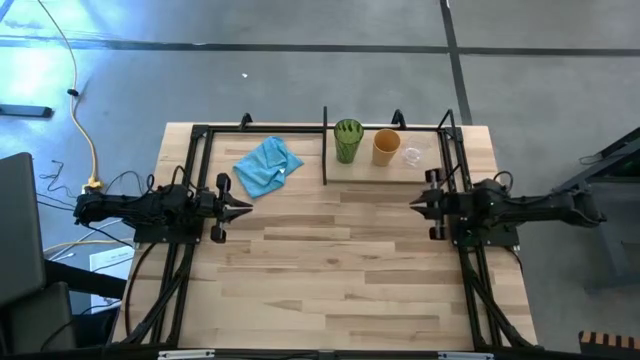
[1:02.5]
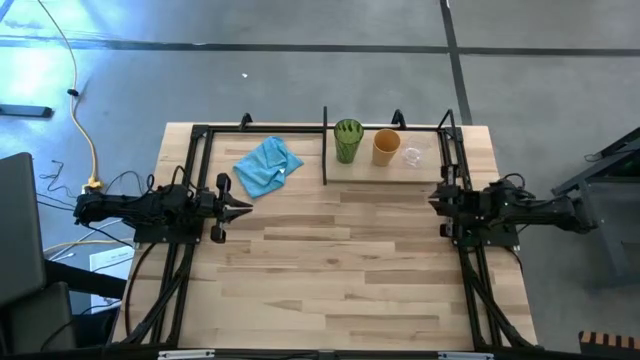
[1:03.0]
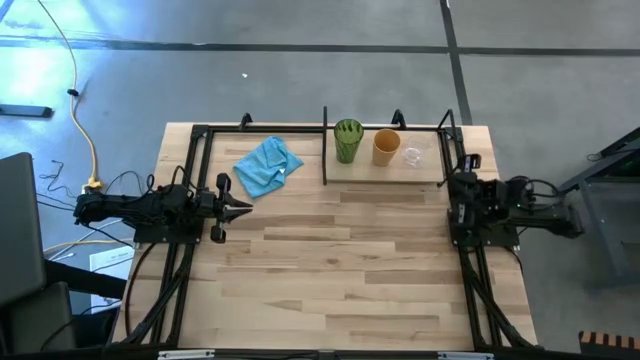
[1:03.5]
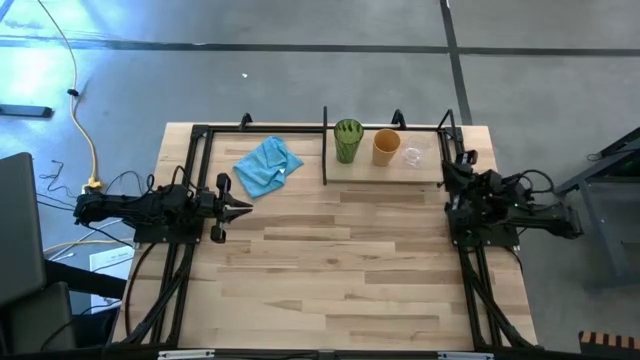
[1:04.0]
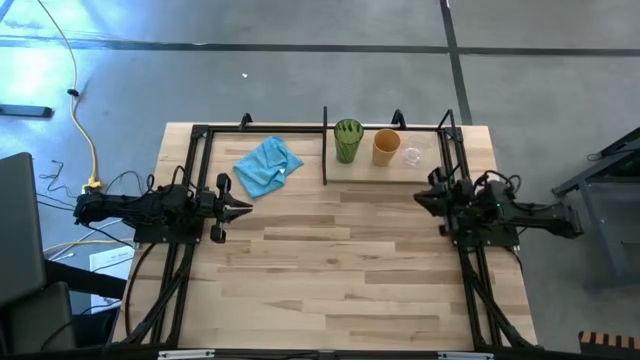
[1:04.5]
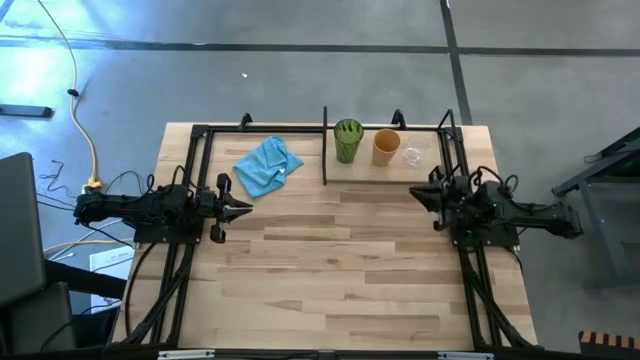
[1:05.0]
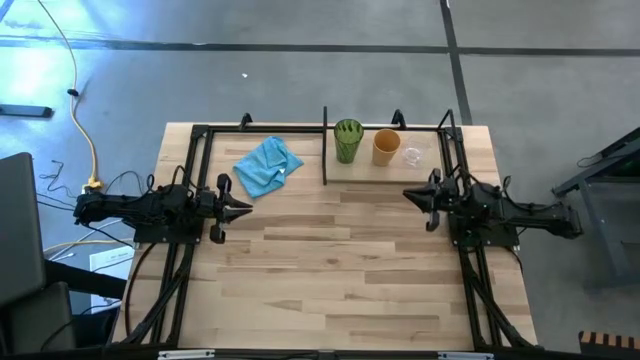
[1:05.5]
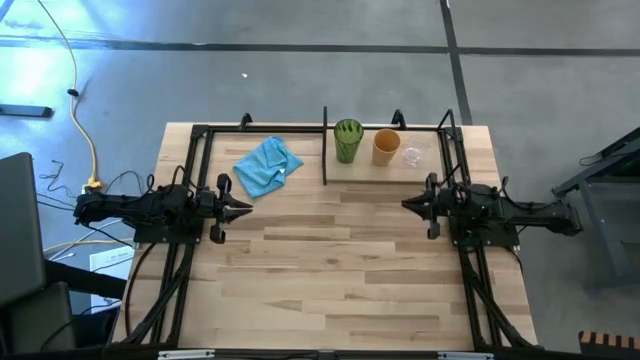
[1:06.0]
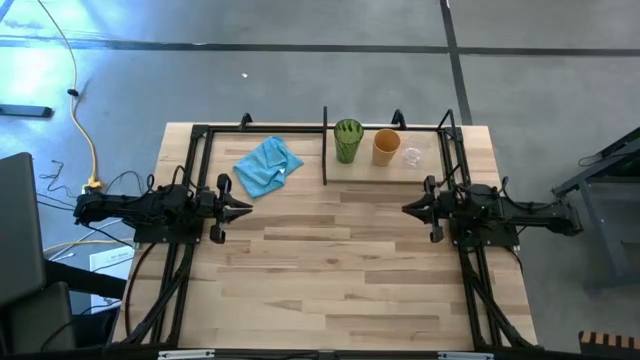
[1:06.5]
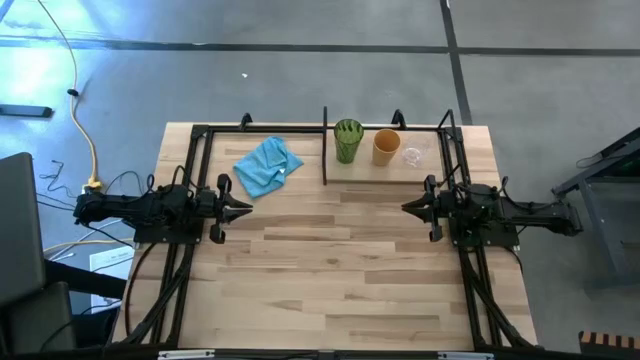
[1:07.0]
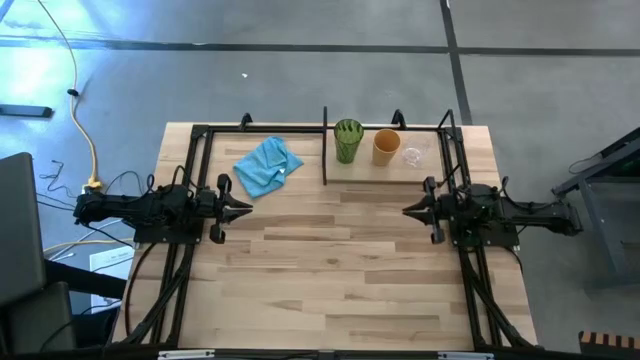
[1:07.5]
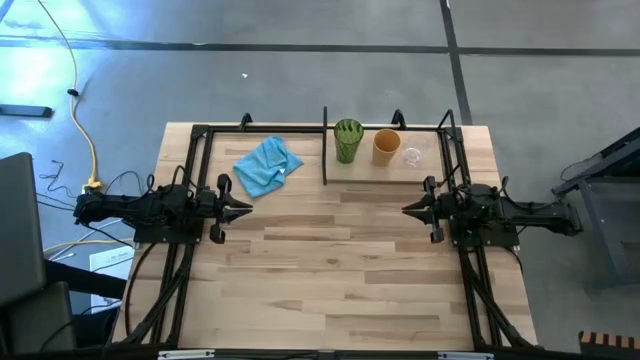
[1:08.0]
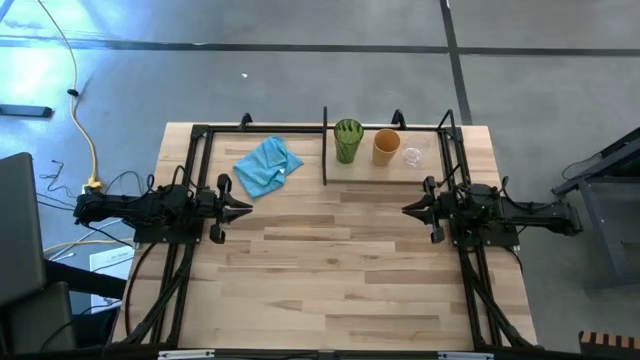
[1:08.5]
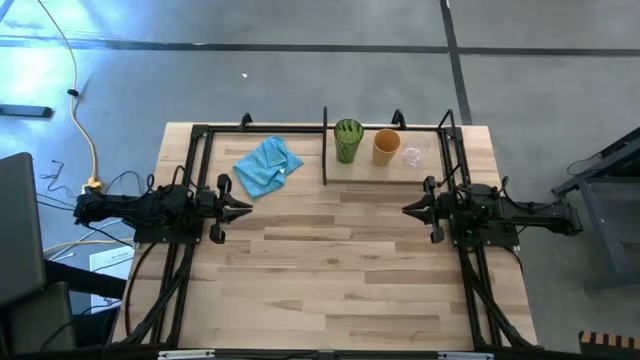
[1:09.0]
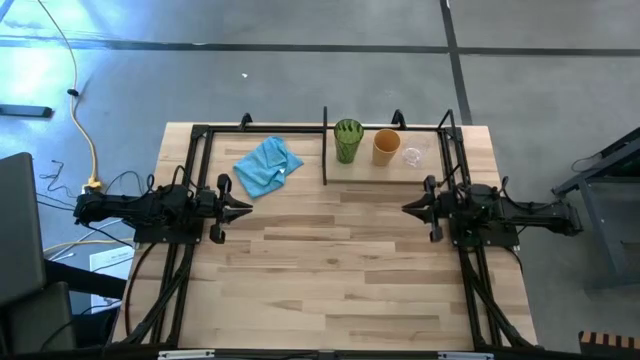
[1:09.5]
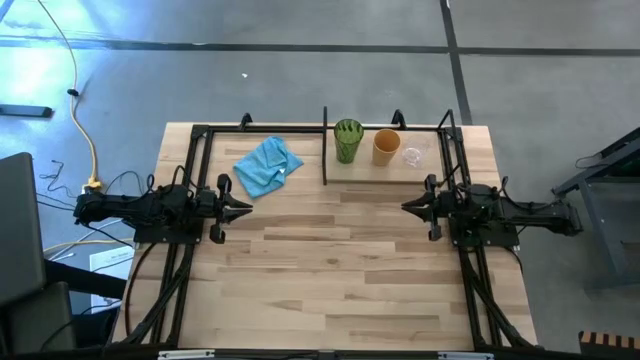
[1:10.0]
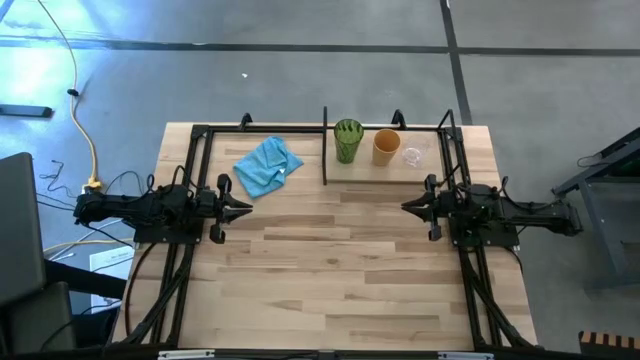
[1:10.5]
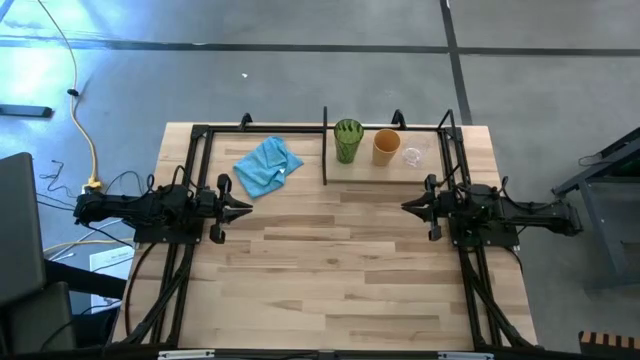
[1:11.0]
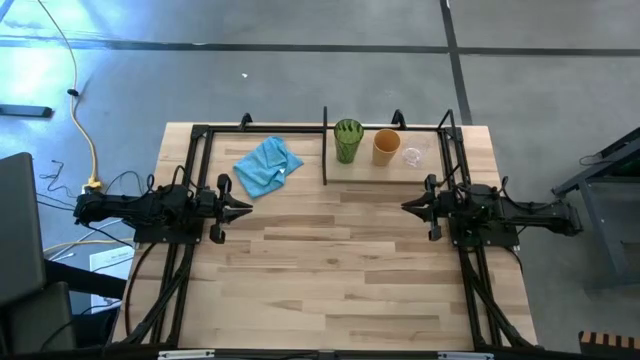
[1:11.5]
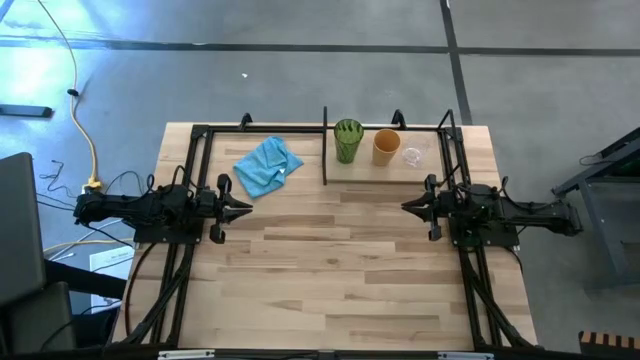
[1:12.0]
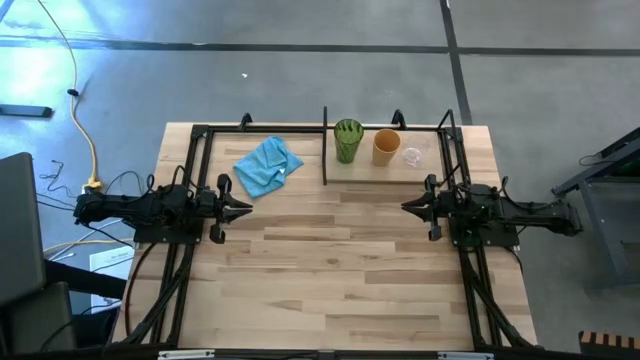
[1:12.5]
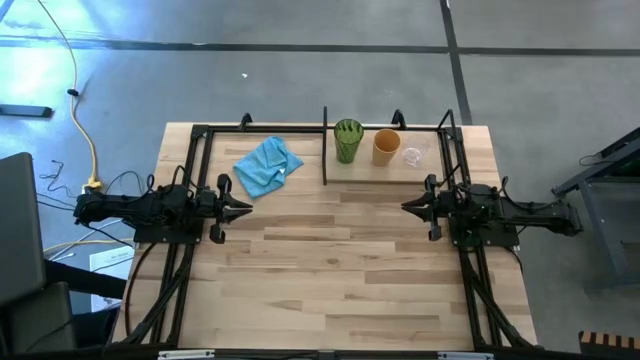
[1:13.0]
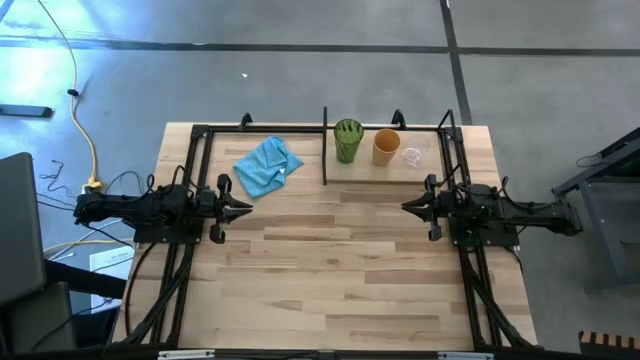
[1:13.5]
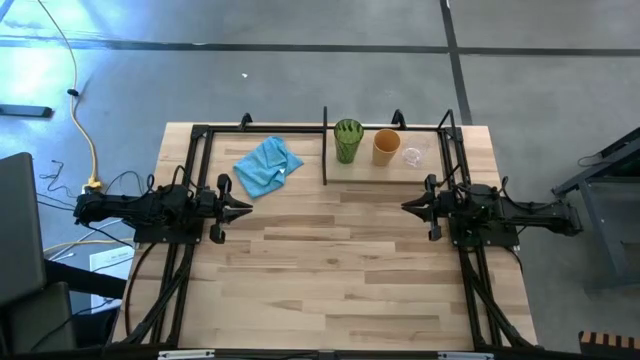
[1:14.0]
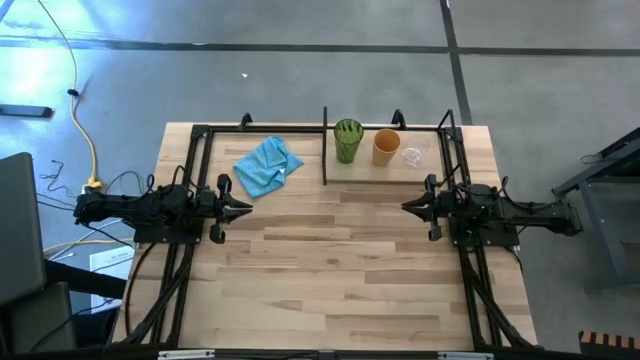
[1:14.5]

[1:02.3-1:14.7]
Task: Stack small to large cups/mugs on shelf
Return to Home Position

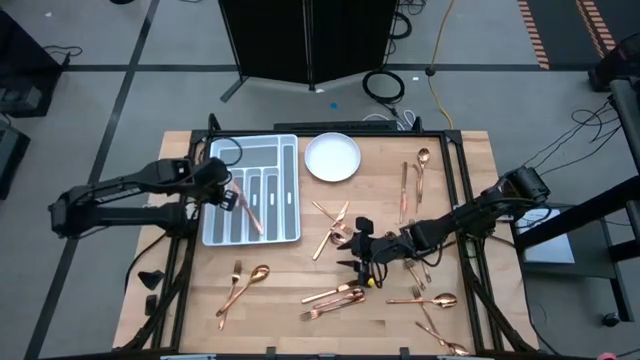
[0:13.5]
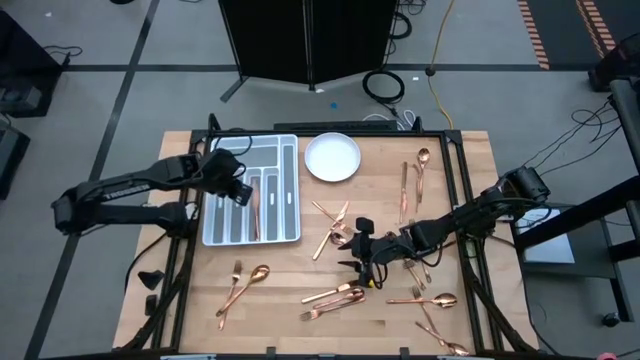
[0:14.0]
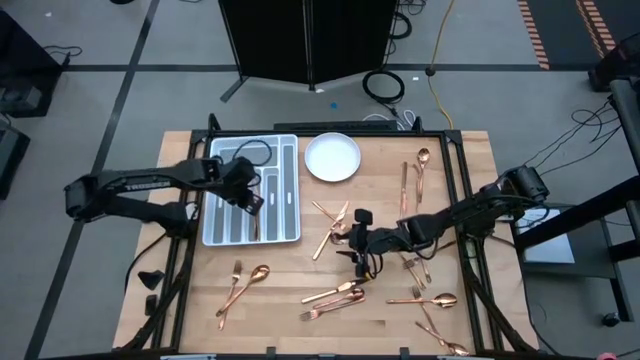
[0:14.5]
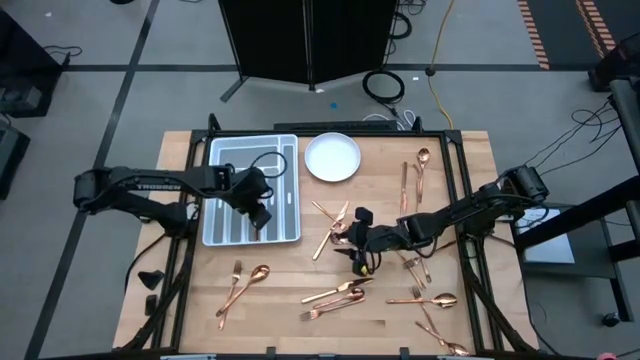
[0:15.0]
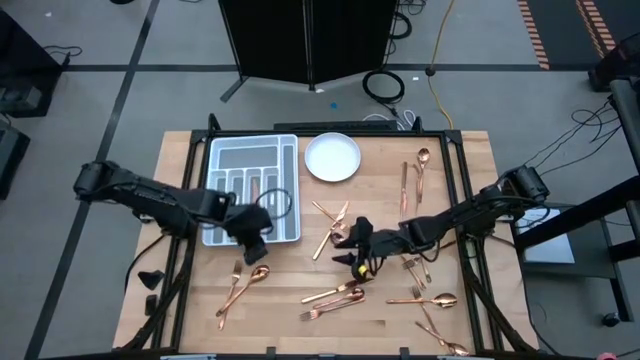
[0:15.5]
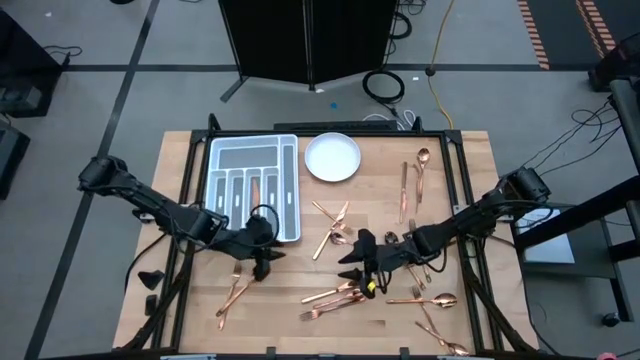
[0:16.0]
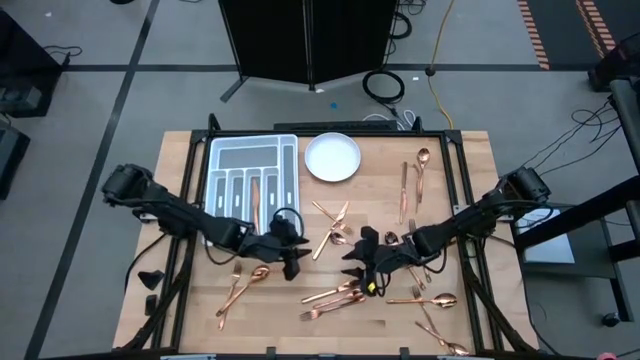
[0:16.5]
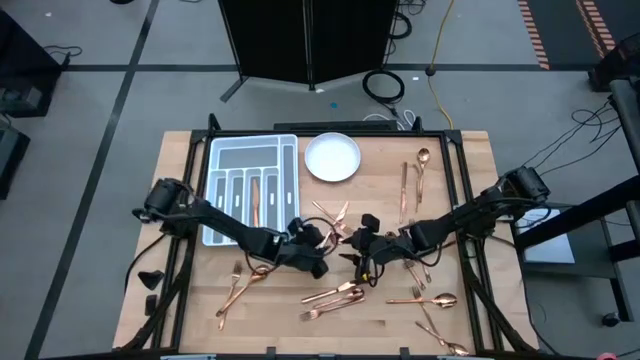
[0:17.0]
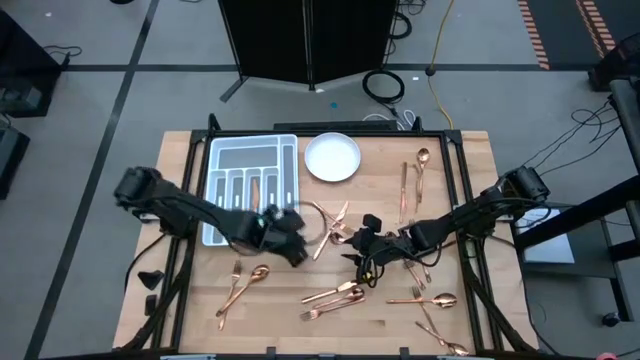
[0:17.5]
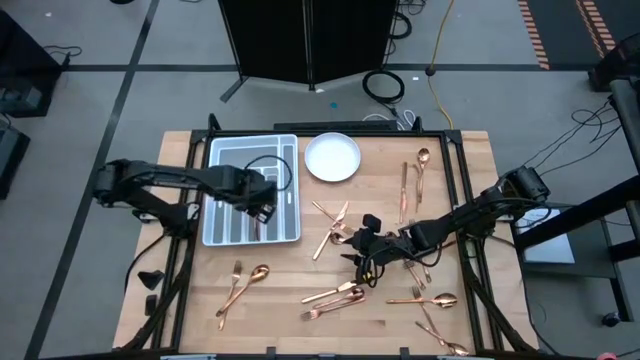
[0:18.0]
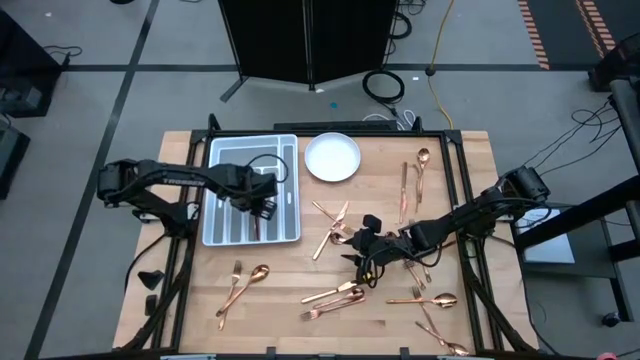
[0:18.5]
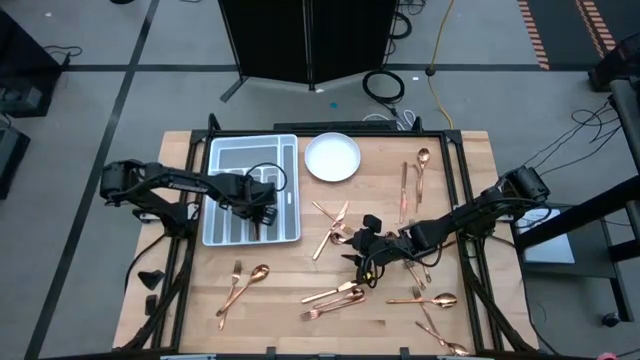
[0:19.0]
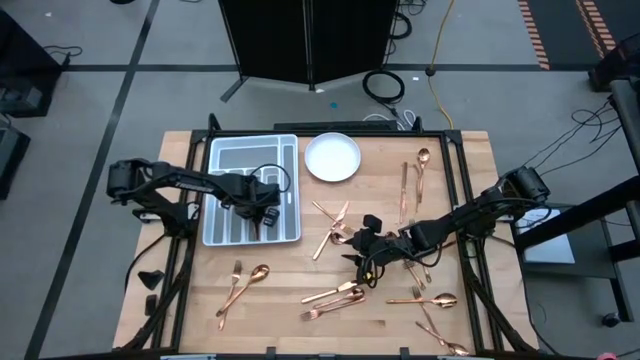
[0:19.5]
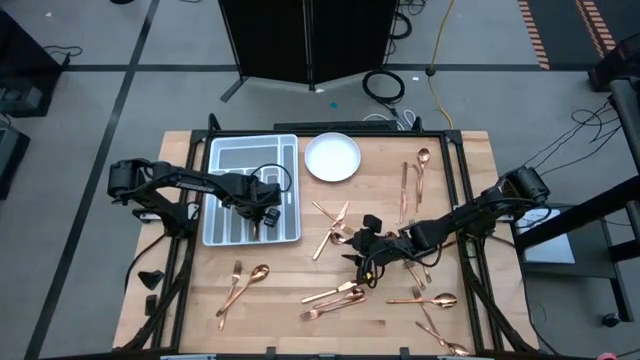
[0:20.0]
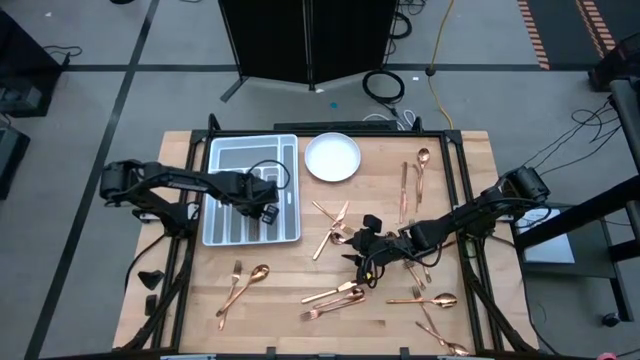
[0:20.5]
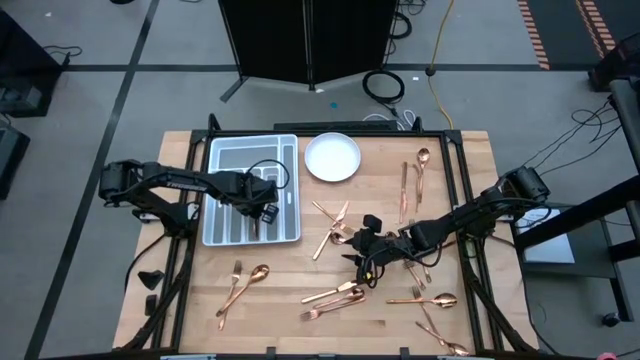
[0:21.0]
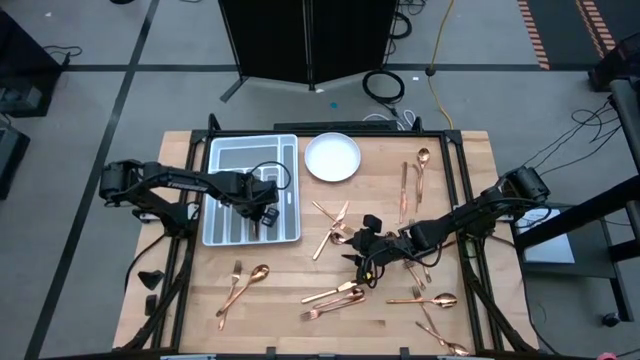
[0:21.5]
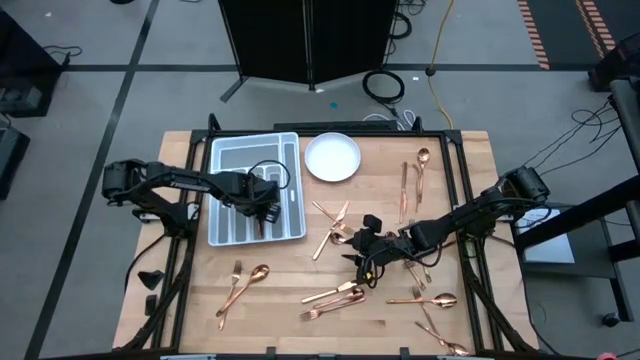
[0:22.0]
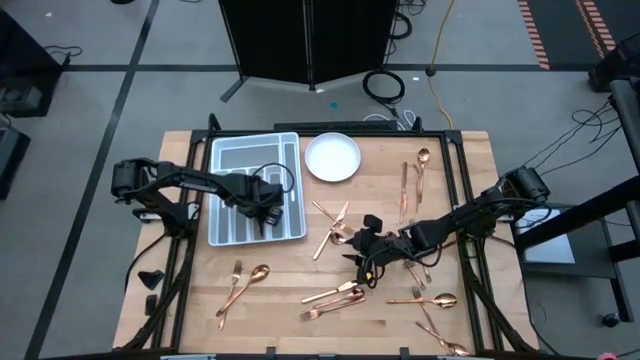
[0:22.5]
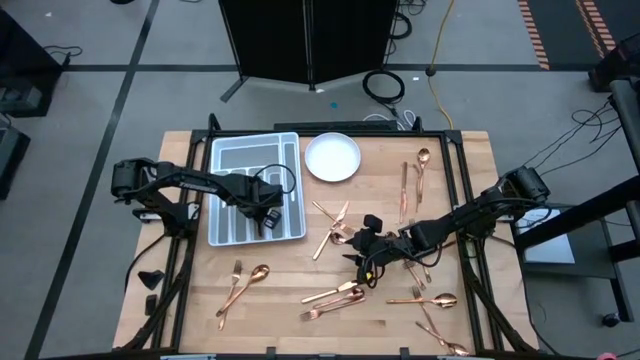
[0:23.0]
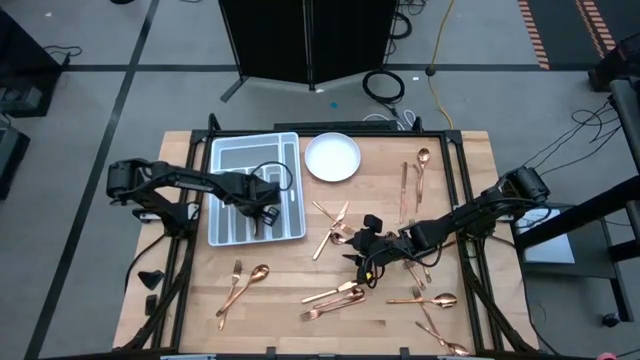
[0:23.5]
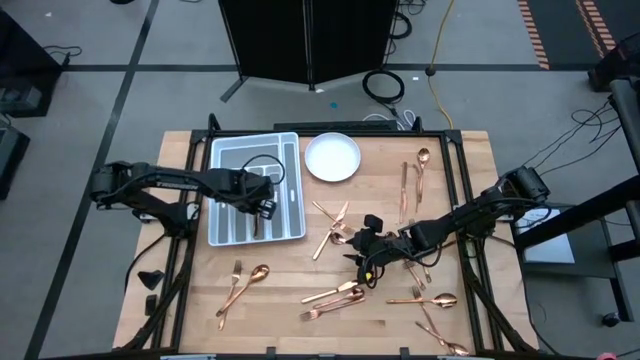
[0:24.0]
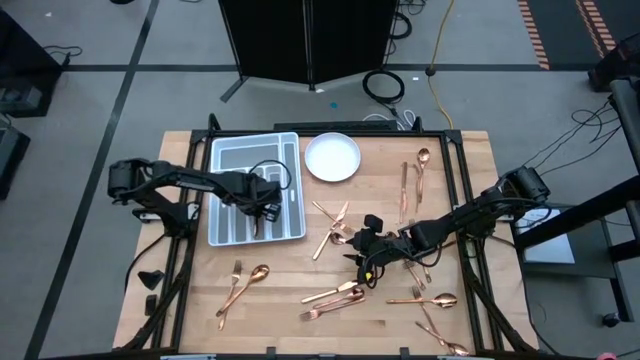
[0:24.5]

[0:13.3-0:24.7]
Task: Sort silverware
Adjust the knife on the utensil tray
